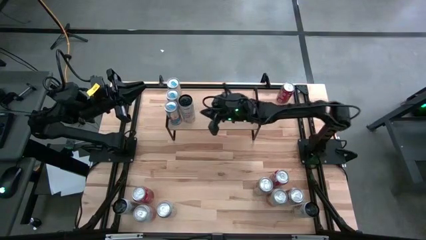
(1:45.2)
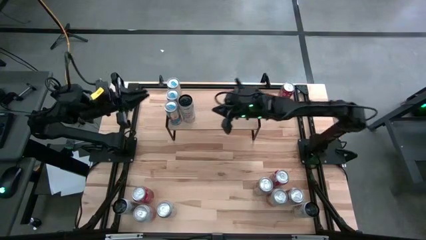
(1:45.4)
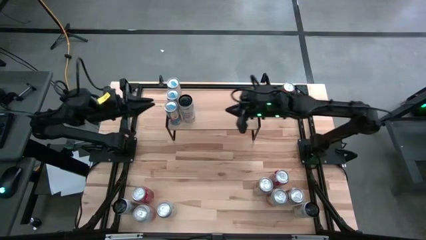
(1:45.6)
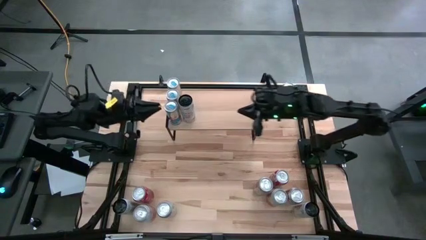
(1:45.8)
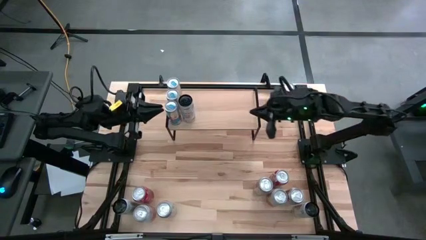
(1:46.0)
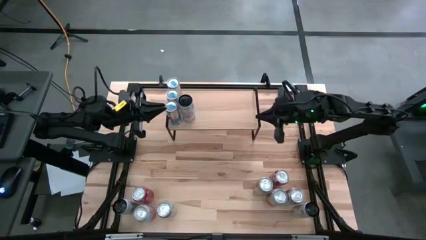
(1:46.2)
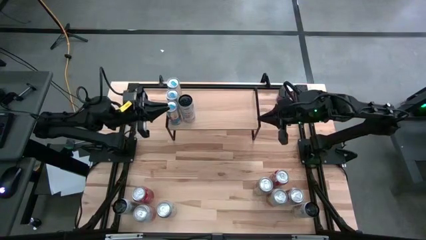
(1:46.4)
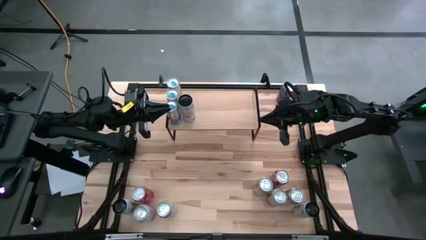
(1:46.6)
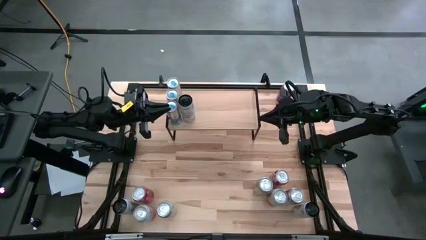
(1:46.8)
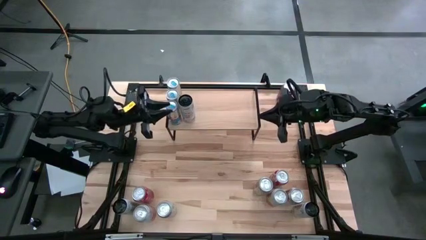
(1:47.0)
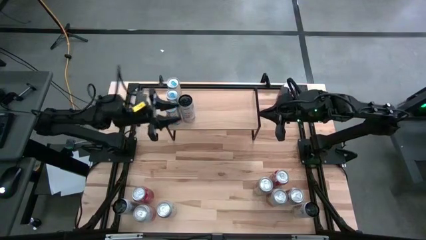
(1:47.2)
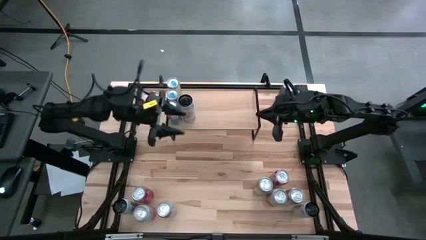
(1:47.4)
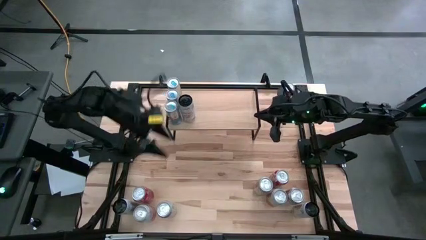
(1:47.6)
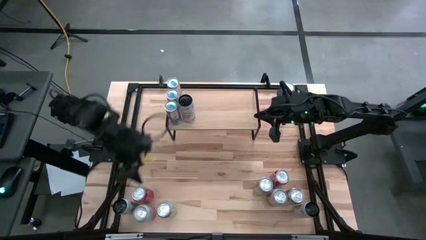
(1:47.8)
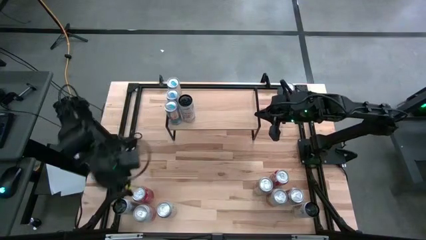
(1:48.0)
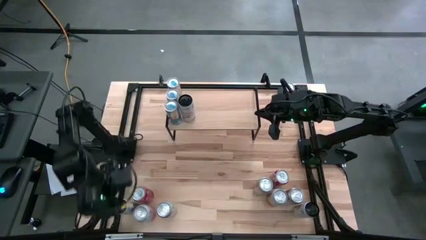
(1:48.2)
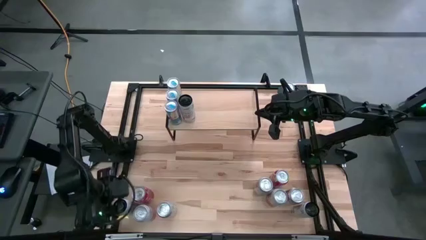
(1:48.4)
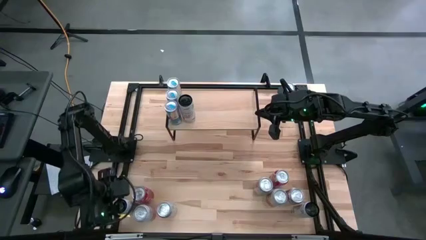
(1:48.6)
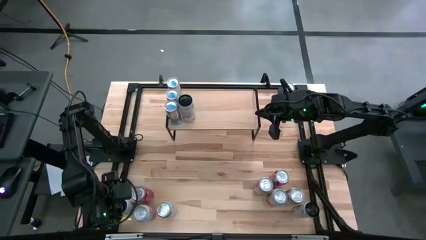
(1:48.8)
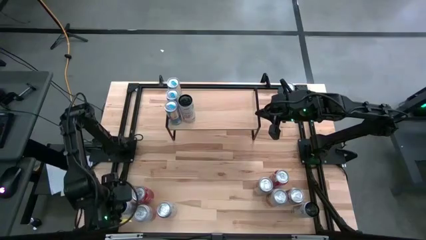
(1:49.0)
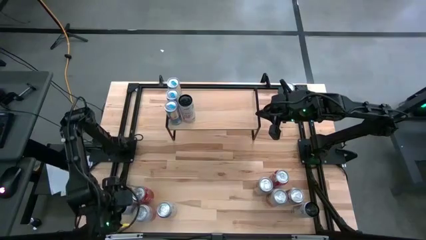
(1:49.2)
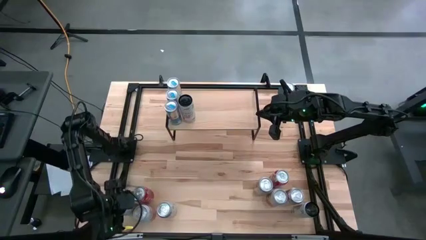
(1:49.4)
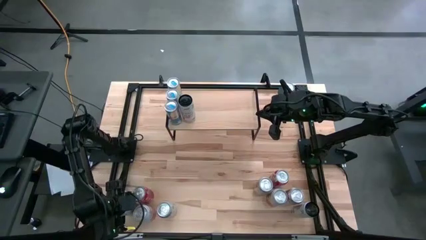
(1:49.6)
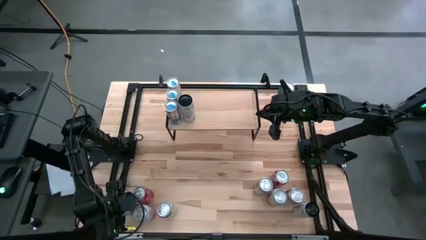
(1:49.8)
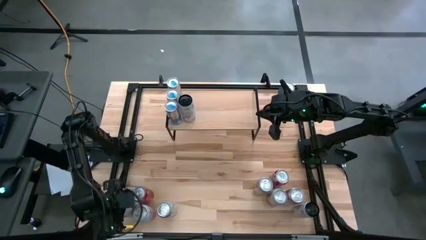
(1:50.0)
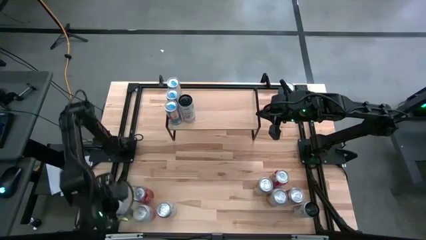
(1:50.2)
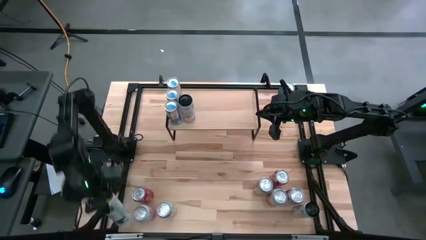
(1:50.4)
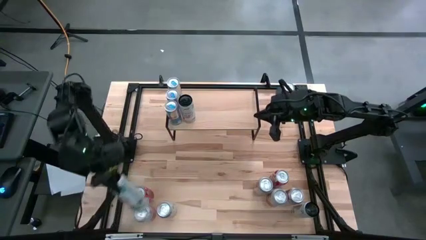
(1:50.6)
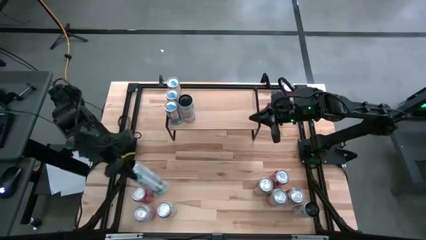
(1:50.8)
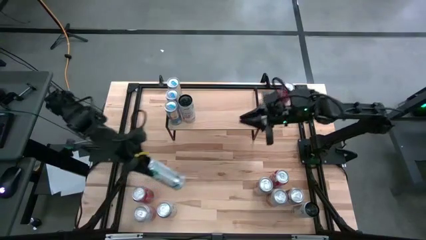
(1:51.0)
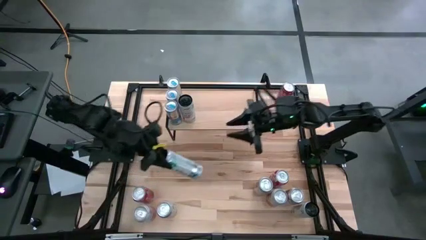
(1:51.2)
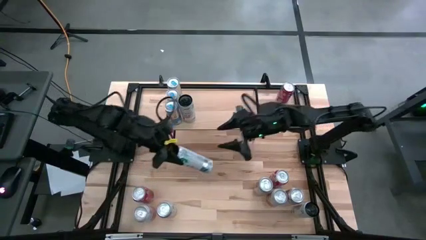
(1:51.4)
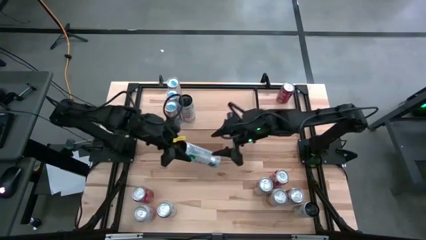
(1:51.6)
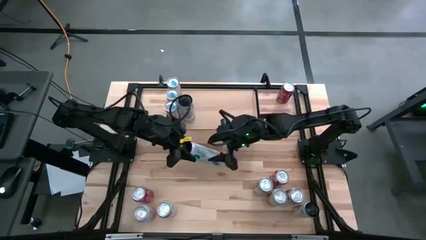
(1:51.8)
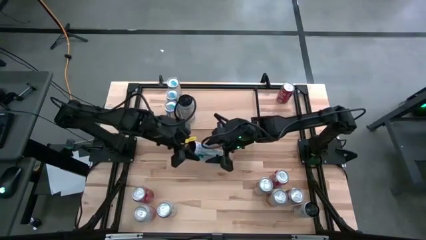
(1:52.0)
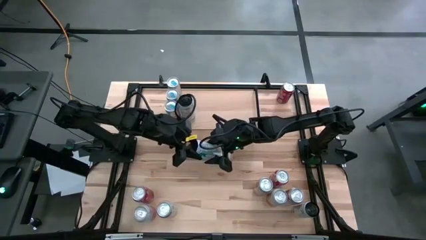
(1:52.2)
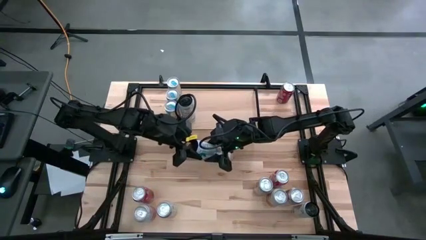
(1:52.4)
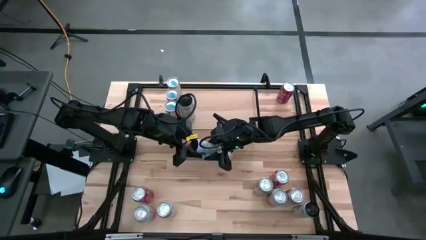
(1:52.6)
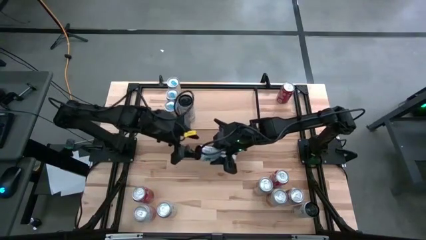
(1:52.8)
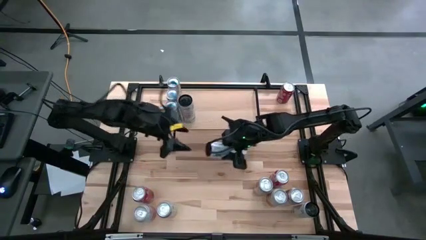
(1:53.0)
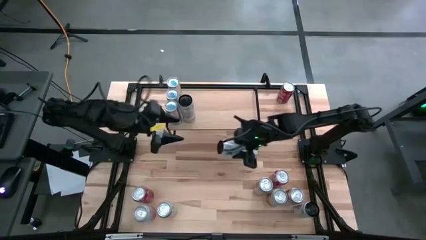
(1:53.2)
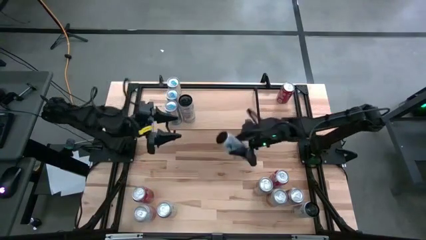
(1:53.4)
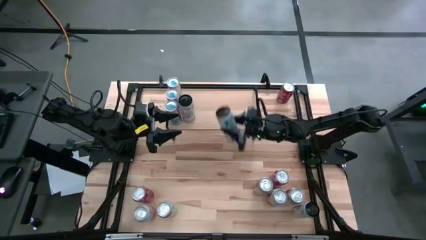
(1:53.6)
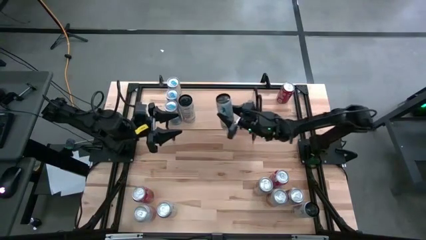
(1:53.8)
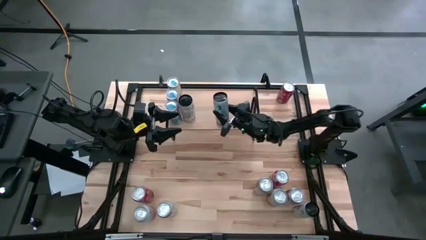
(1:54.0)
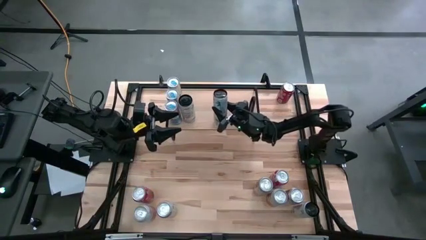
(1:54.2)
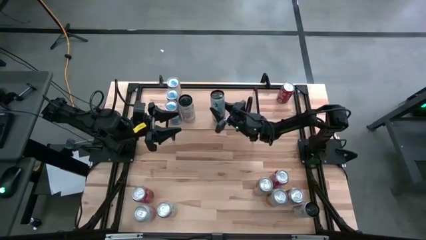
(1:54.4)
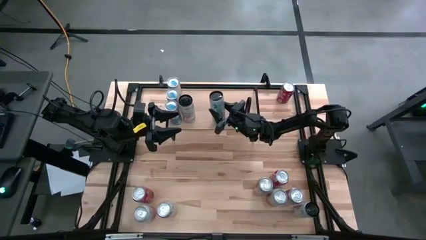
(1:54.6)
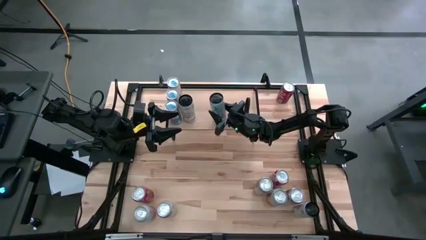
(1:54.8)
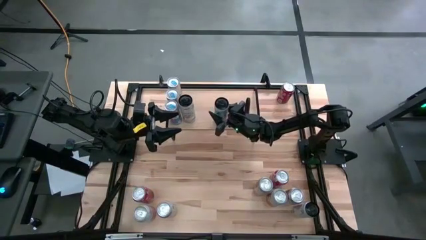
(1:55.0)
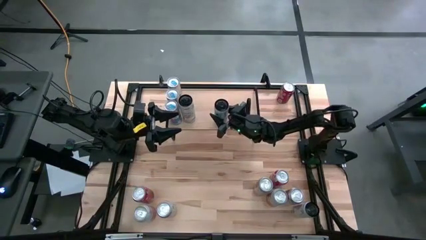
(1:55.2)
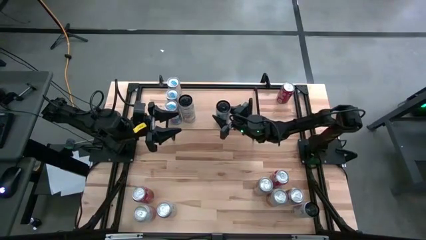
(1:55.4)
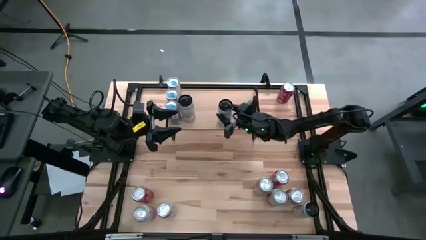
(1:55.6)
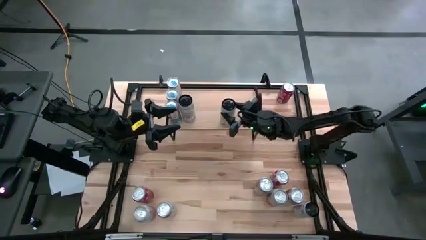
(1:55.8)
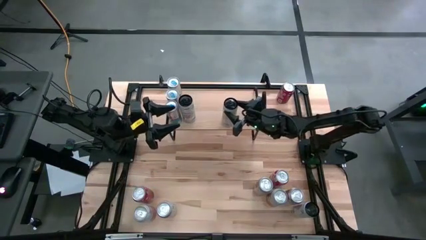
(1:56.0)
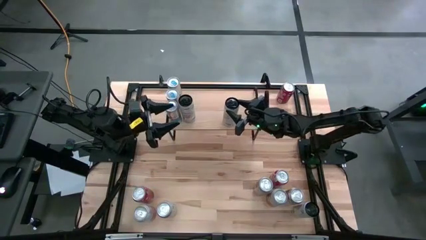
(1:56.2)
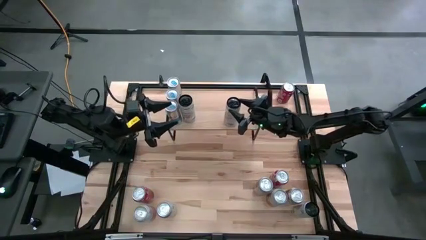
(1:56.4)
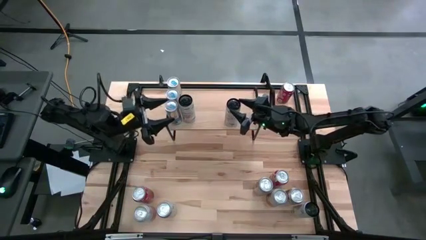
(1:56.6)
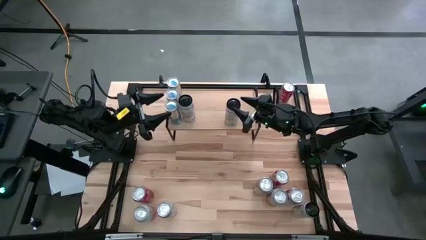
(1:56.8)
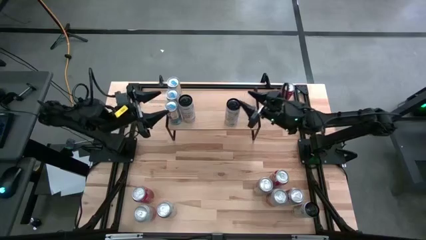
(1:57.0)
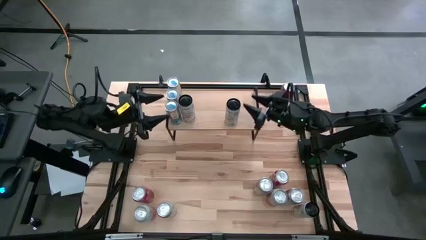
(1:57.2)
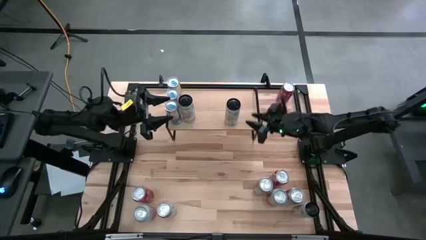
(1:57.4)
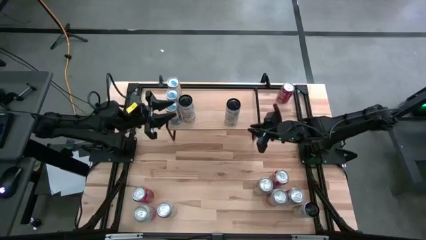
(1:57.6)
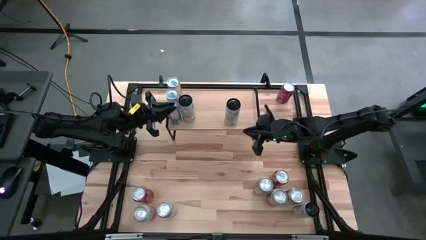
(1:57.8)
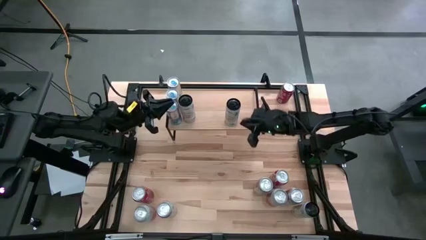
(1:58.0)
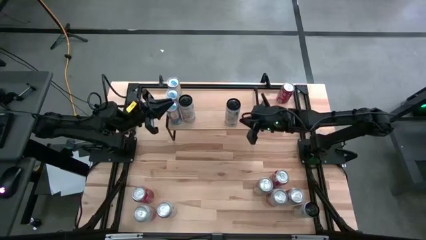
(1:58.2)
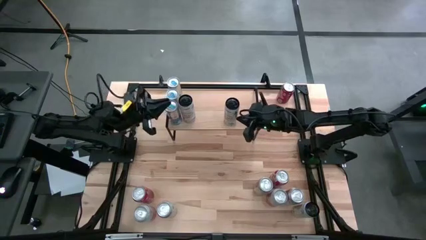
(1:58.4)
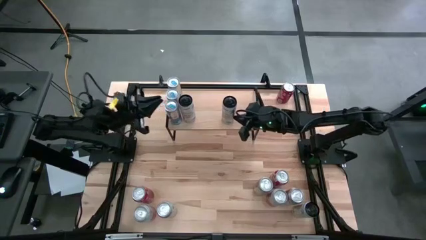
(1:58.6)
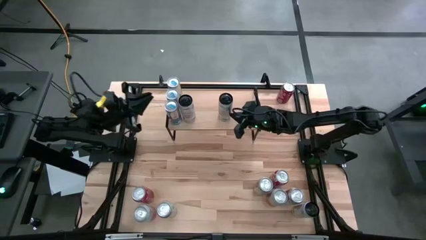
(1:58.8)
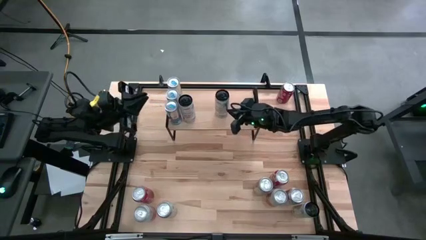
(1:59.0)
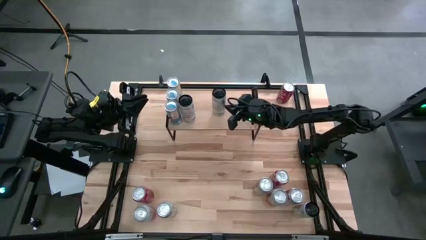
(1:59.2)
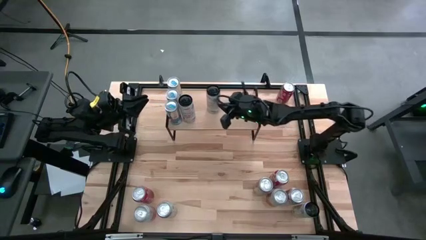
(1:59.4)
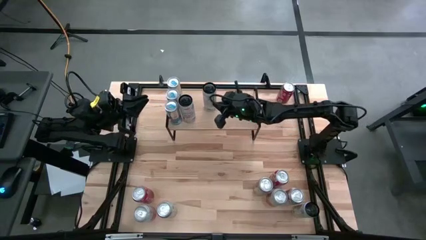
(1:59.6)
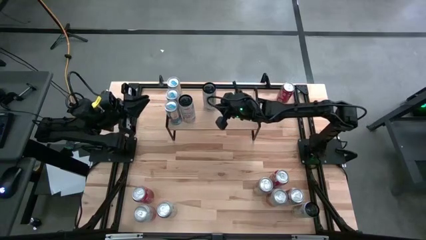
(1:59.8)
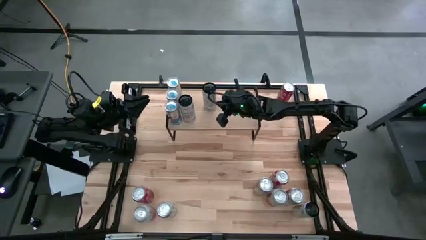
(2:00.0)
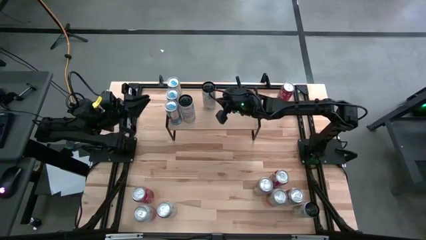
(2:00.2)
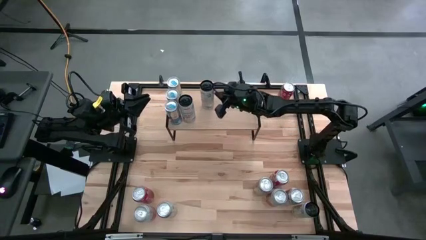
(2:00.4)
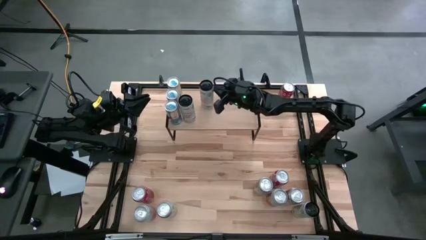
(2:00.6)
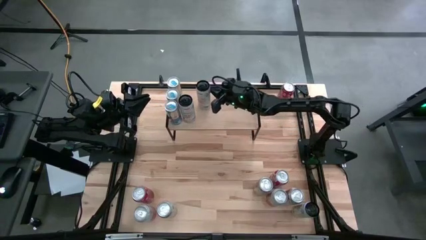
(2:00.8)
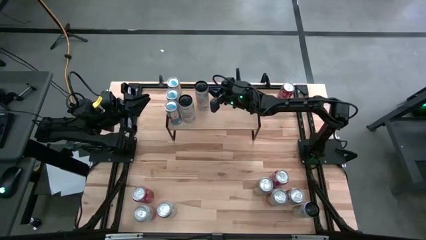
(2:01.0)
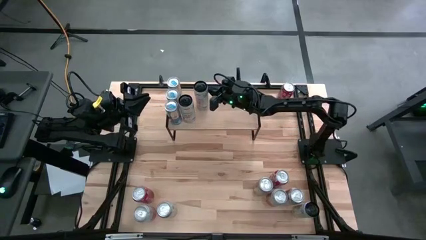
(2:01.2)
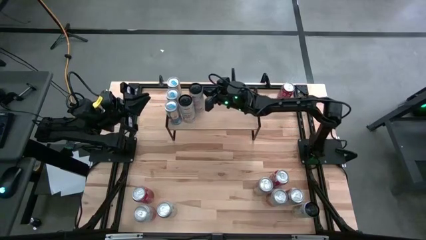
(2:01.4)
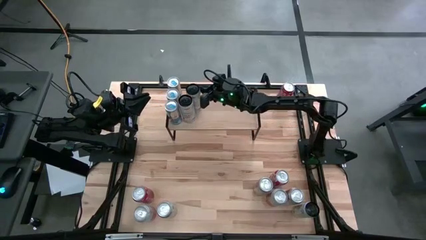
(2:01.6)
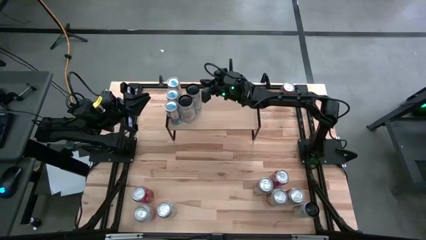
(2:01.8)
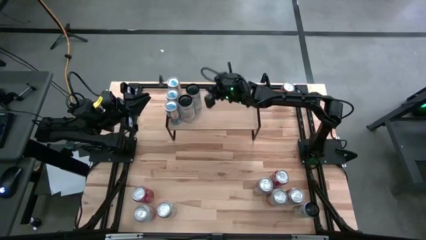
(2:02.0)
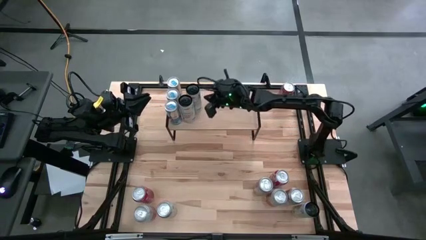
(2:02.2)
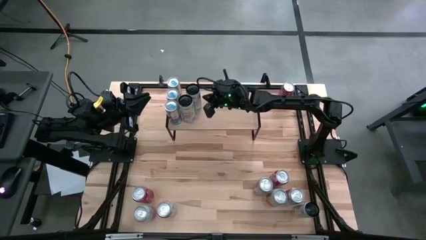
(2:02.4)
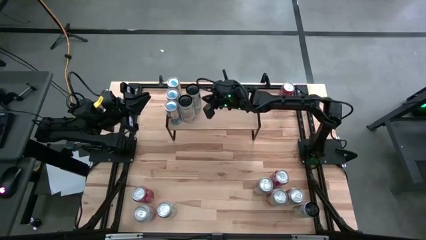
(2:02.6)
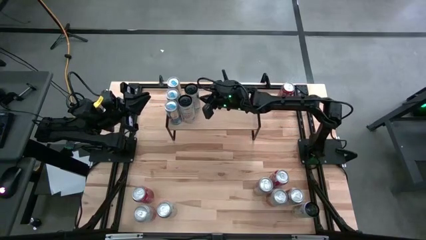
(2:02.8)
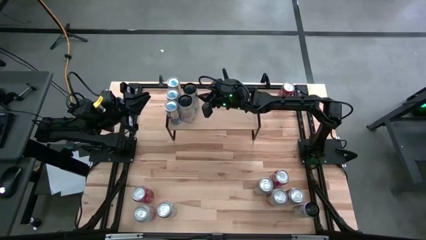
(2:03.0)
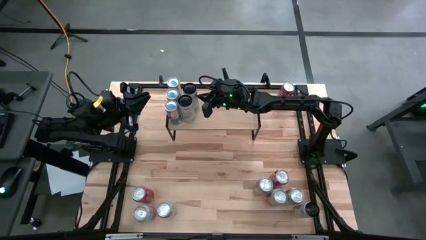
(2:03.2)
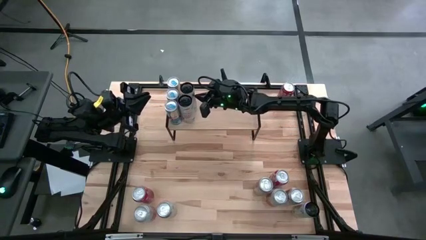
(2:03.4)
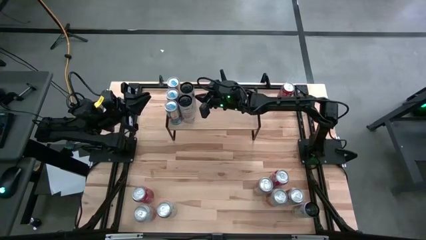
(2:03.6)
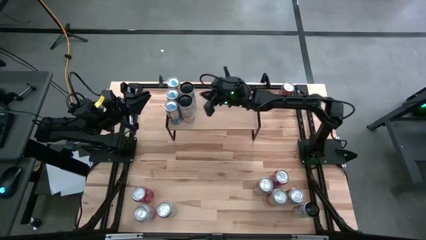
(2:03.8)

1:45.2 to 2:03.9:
Task: Place canned beverage on shelf
Put the left white-pink soda can aligned with the other white-pink soda can on the shelf
